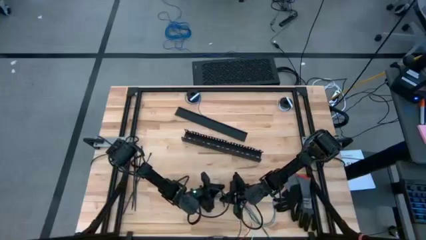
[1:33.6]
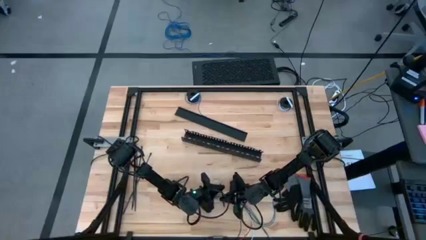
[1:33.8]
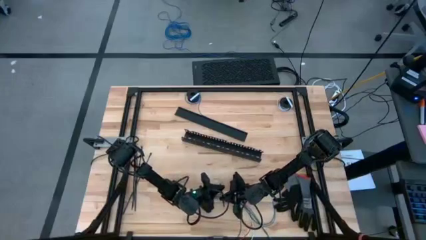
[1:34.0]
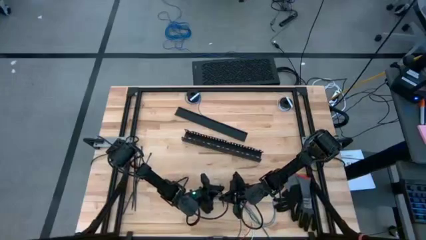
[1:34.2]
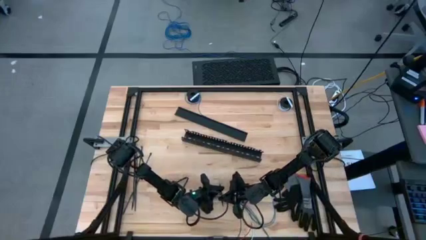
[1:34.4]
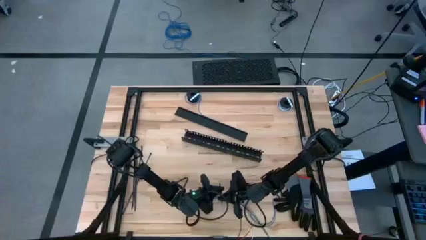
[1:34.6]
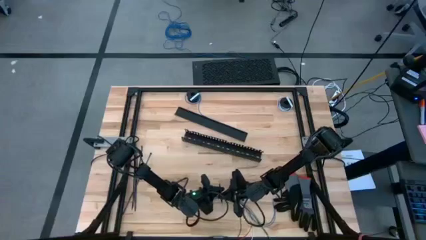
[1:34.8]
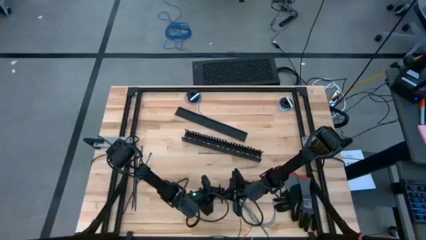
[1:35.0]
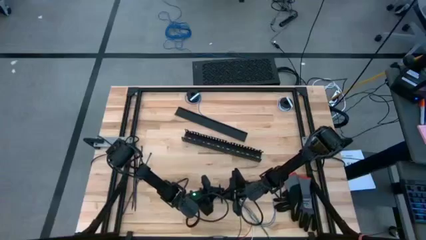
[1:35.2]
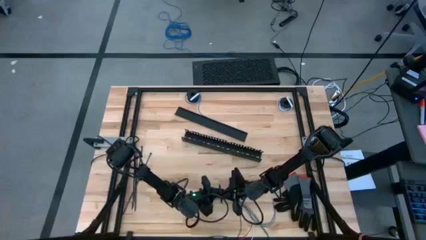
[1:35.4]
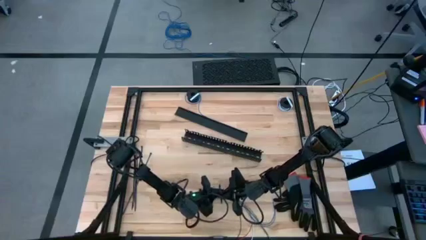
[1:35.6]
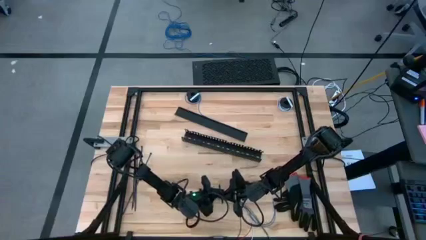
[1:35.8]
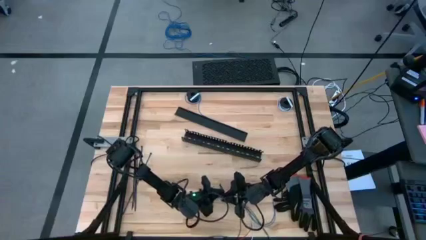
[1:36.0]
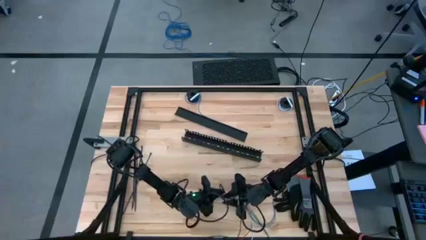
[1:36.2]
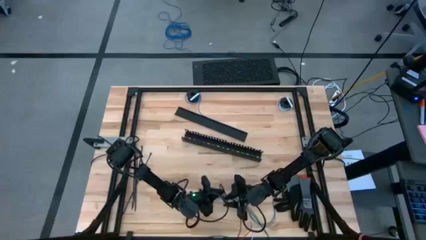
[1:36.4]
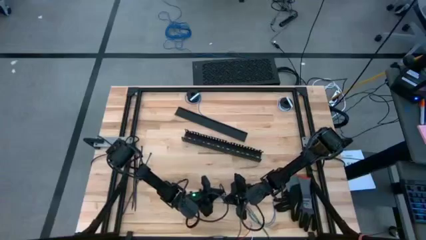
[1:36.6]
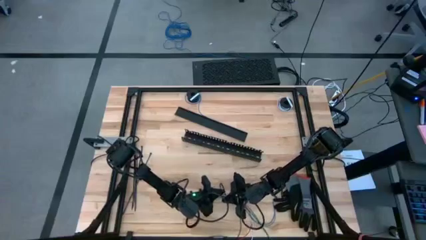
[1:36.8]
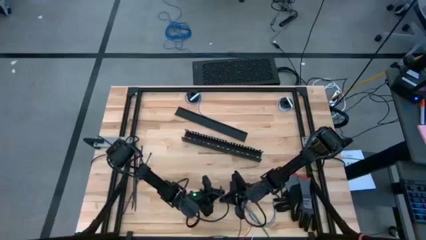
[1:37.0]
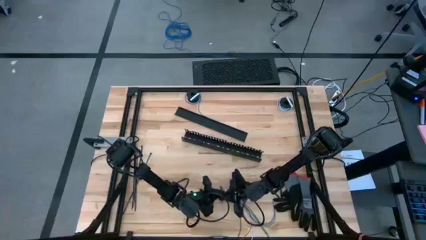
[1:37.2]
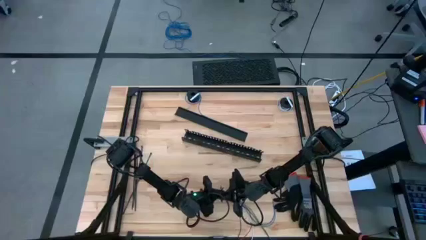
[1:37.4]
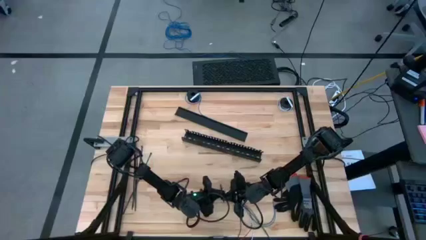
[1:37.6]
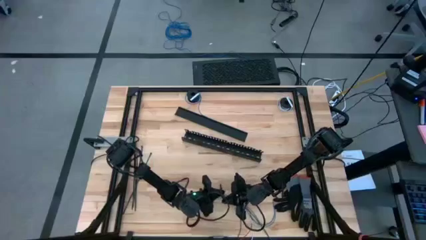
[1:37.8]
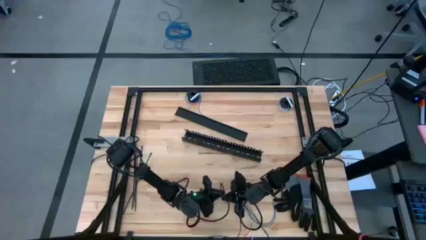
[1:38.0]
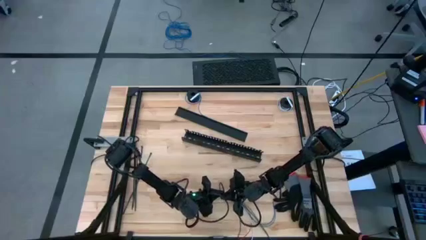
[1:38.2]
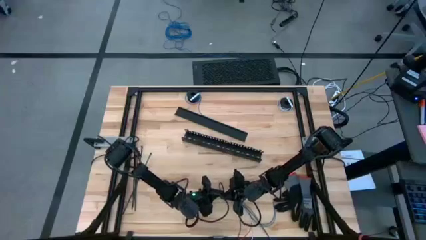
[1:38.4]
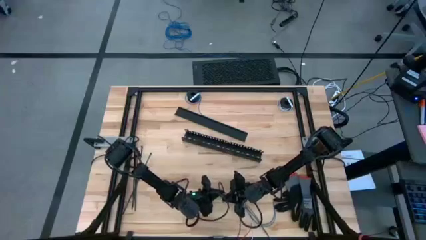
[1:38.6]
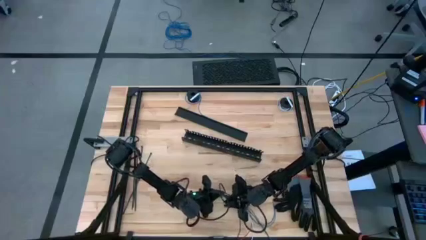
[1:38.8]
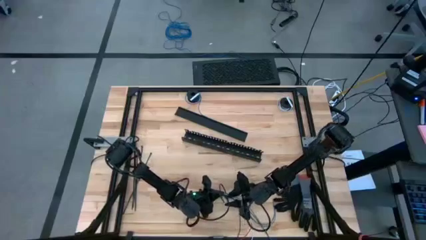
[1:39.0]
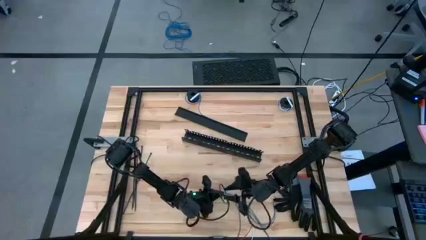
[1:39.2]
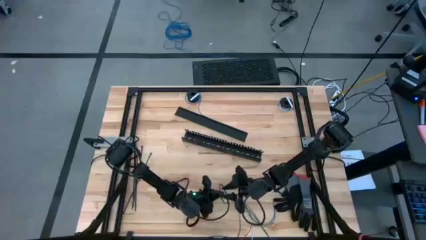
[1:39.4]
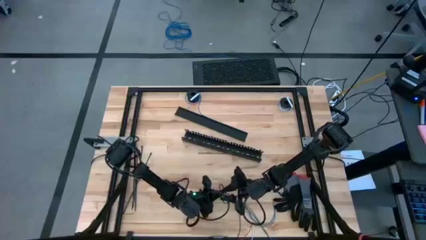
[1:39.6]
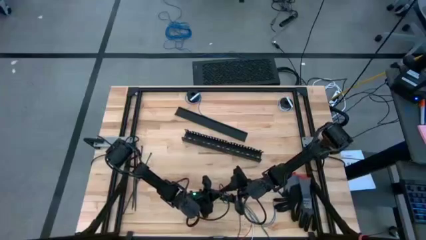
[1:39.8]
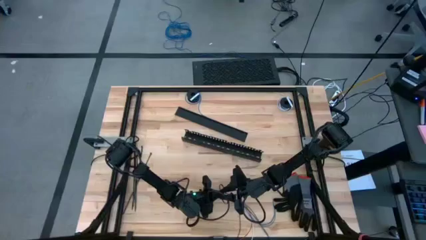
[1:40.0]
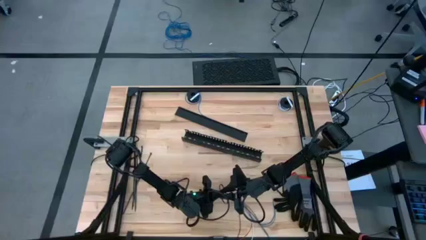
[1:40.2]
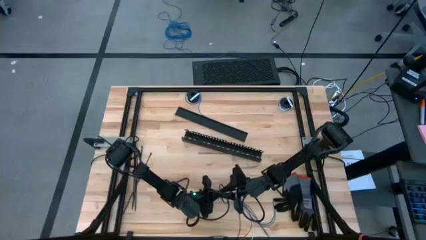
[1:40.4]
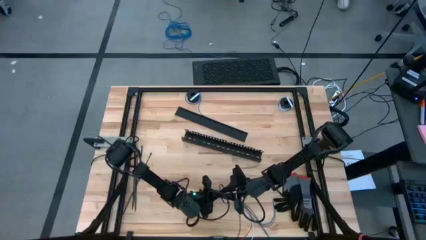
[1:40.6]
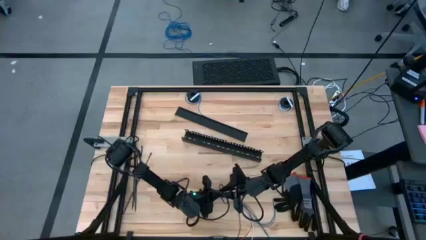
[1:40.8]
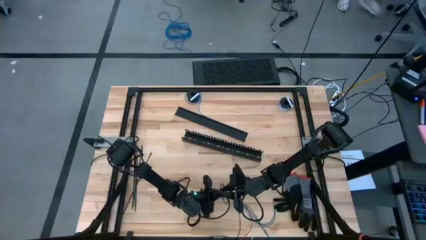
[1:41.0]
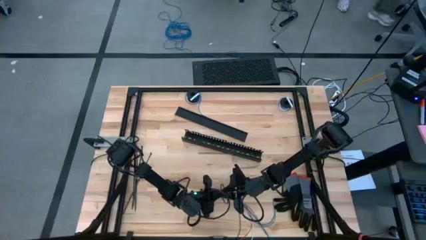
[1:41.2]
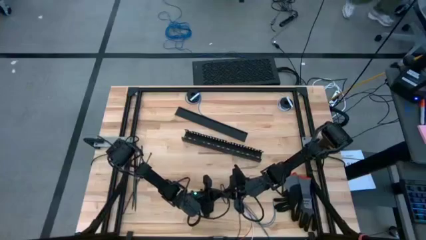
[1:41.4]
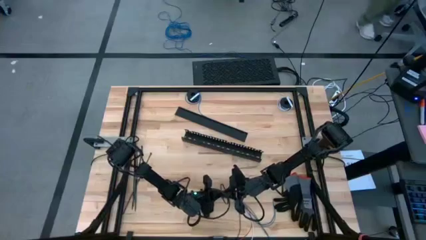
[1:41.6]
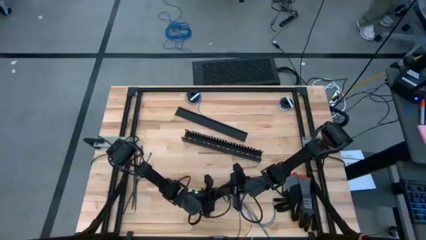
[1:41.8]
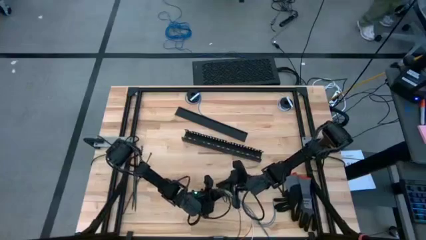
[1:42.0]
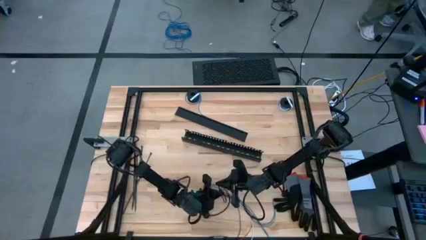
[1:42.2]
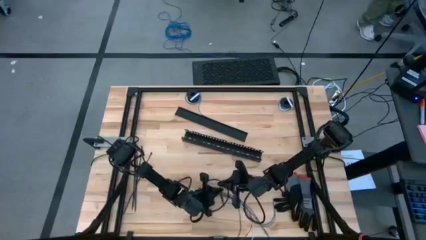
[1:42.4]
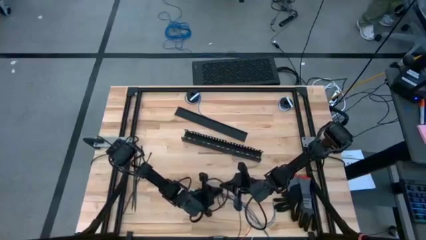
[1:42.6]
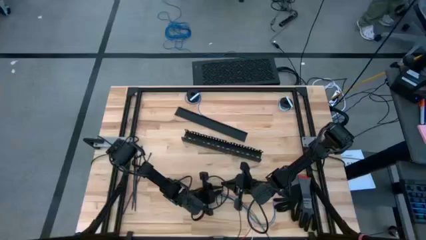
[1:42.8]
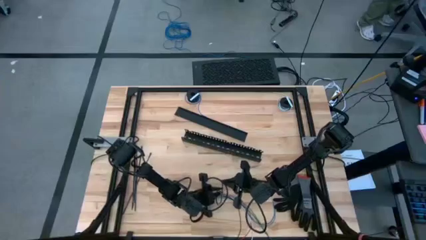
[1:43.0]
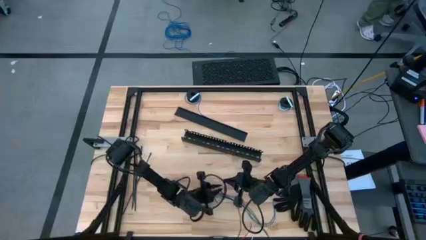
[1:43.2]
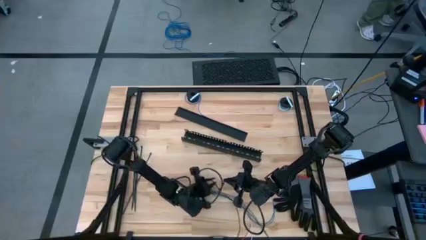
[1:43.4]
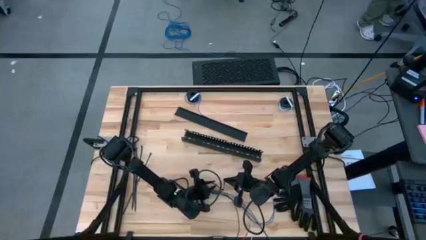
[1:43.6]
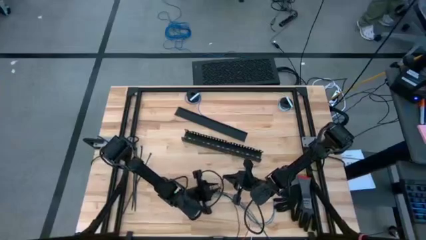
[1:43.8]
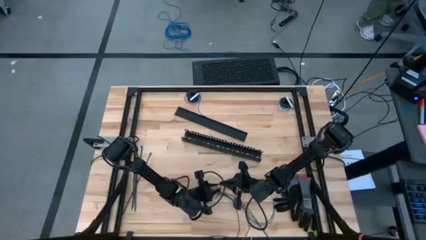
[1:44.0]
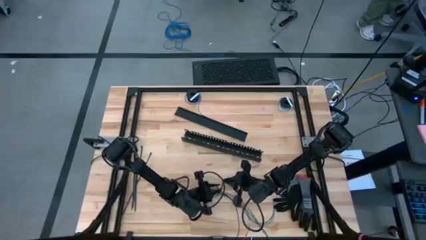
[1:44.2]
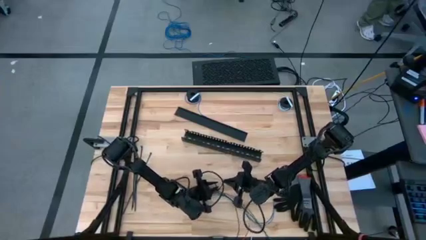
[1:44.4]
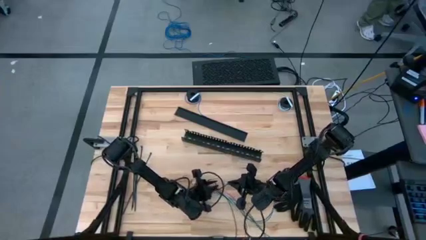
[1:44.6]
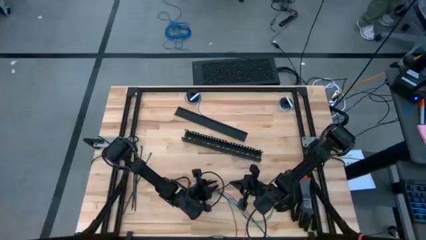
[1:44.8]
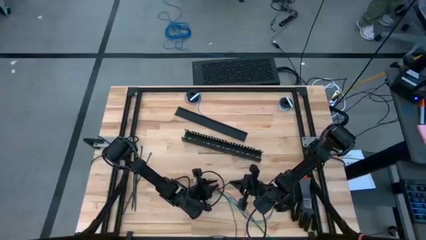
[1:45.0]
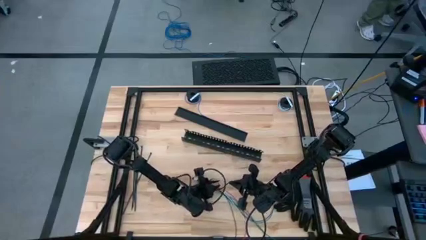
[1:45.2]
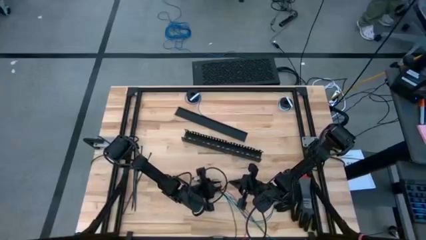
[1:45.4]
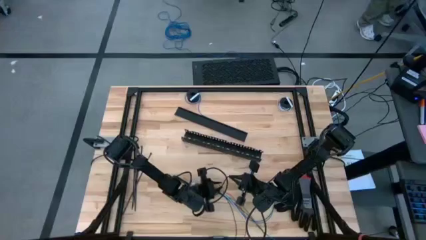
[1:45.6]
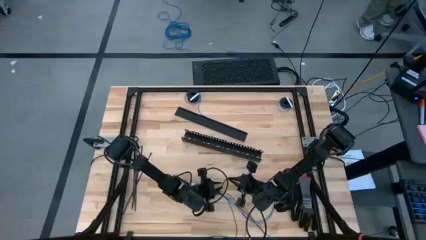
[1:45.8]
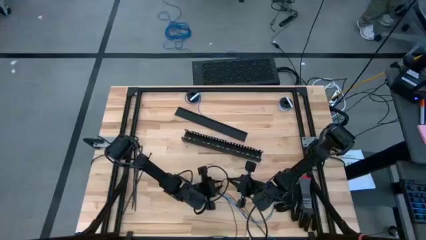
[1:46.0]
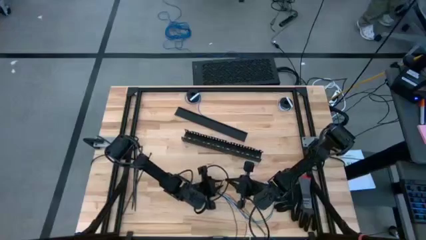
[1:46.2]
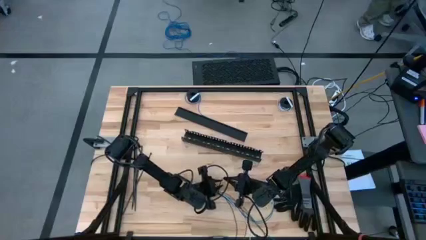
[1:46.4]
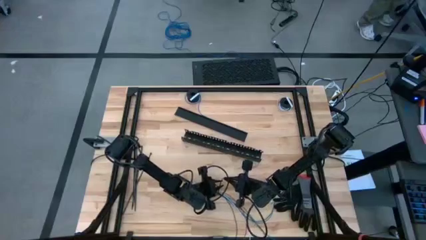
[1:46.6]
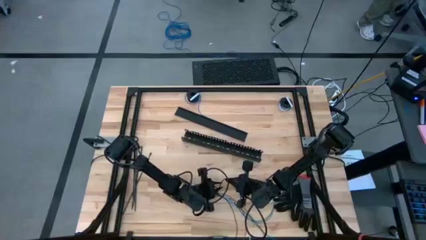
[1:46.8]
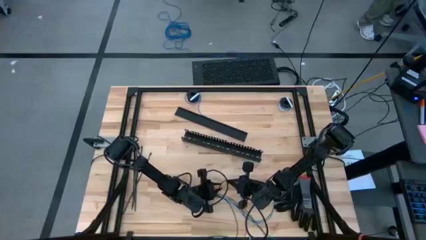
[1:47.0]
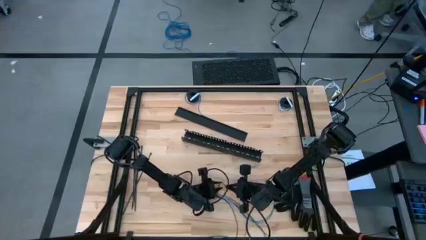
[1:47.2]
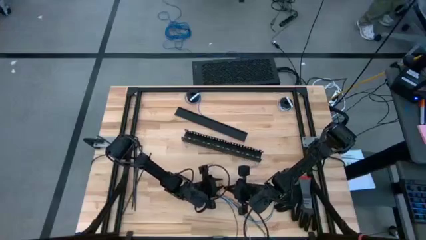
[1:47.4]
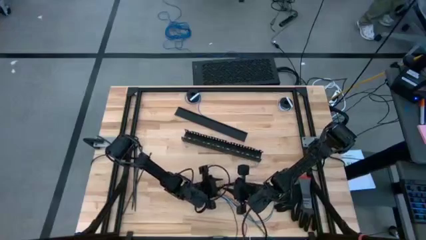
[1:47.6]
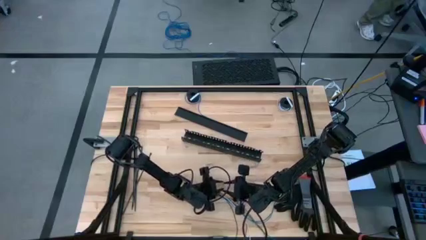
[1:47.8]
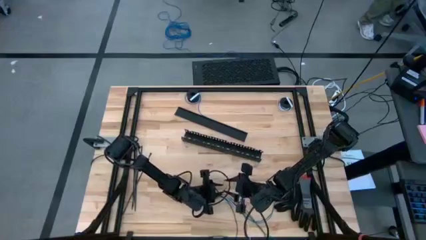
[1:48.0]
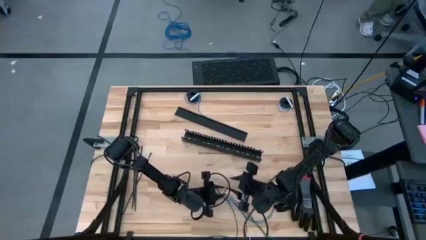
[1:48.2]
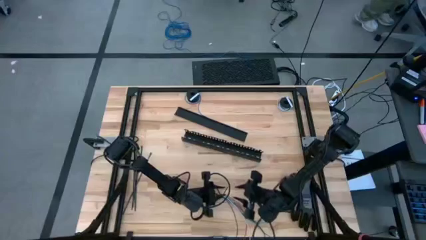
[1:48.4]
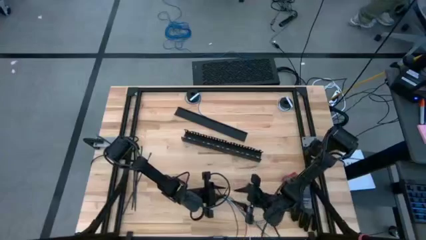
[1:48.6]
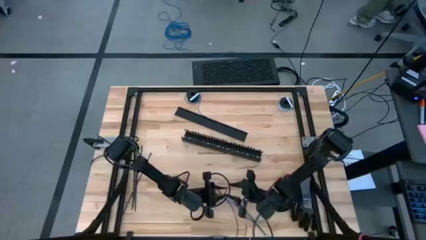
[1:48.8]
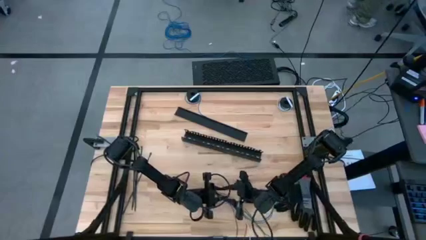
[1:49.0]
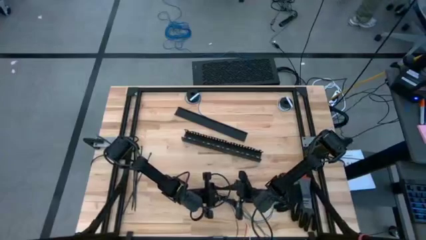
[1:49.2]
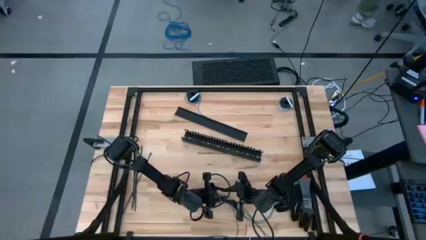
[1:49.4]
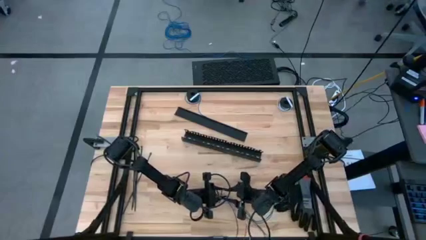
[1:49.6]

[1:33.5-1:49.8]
Task: Ziptie cables
Wrap the cable wires with the black zip tie
